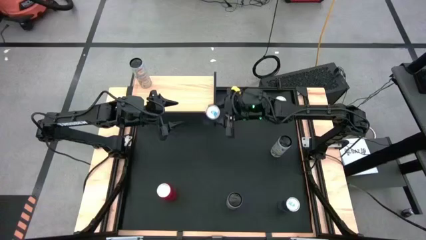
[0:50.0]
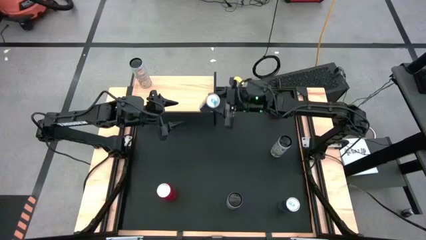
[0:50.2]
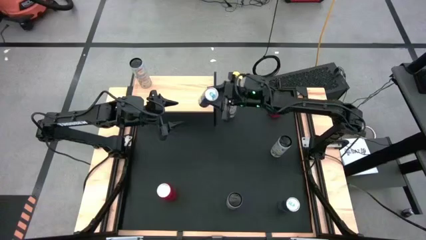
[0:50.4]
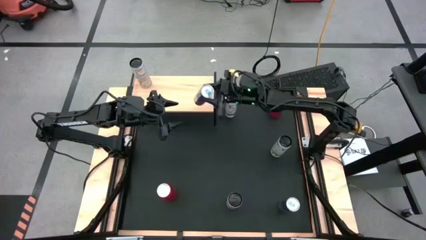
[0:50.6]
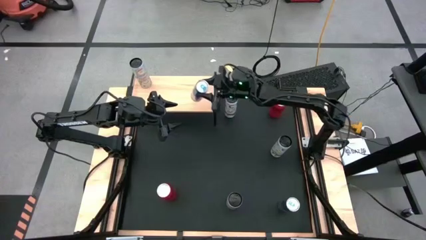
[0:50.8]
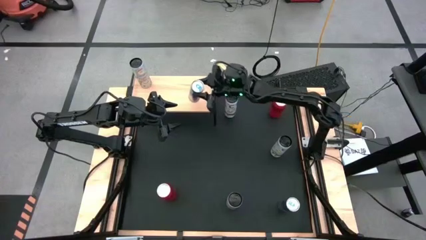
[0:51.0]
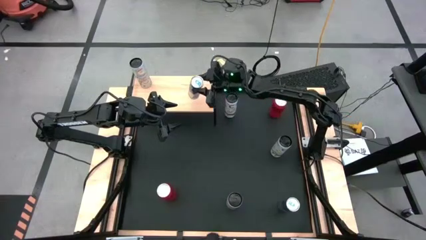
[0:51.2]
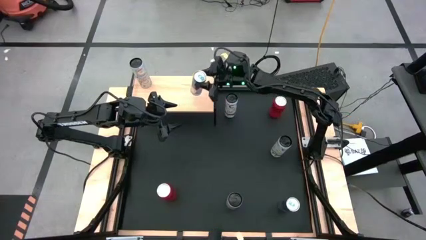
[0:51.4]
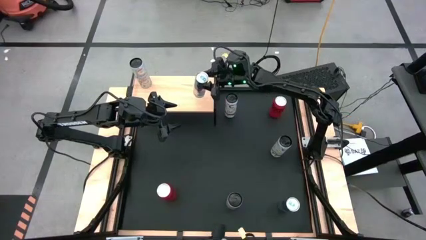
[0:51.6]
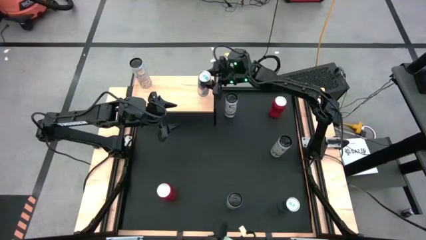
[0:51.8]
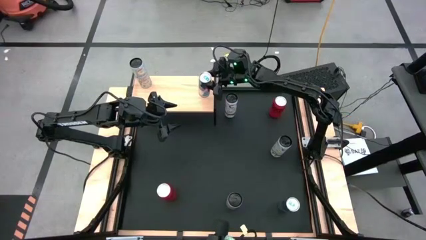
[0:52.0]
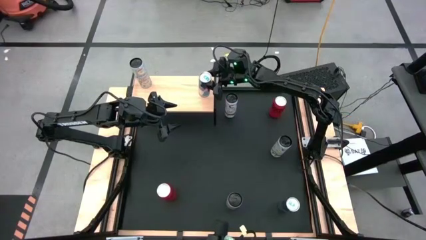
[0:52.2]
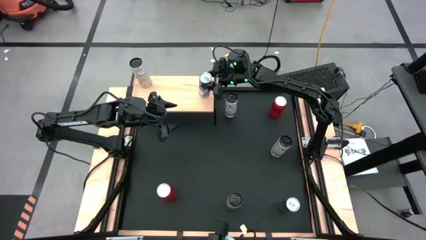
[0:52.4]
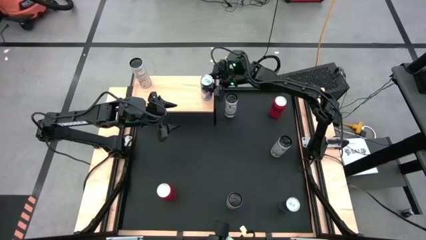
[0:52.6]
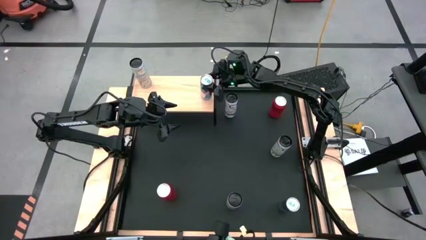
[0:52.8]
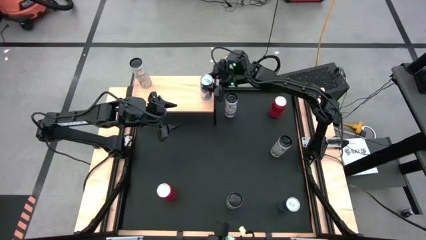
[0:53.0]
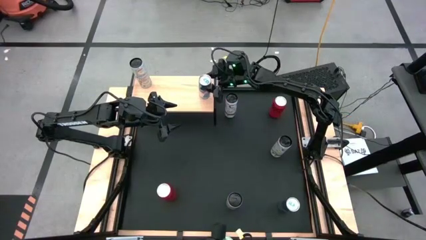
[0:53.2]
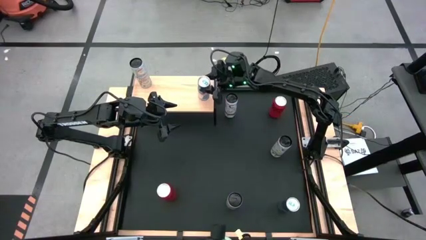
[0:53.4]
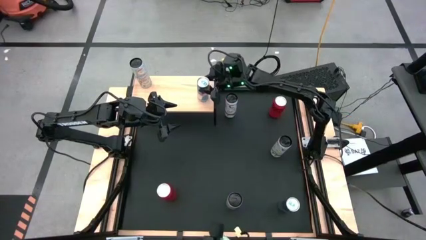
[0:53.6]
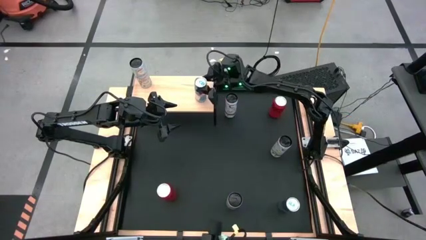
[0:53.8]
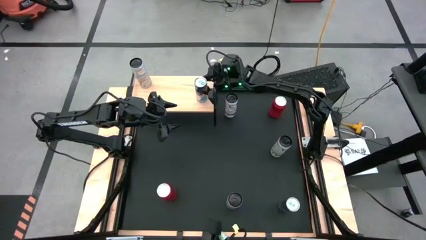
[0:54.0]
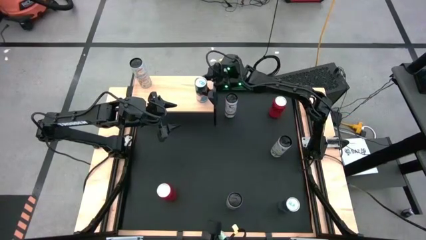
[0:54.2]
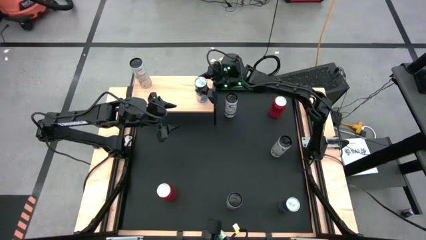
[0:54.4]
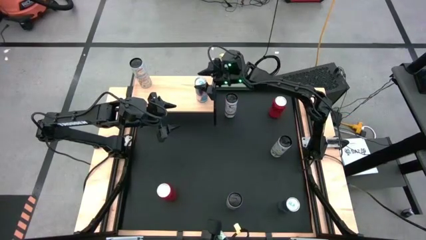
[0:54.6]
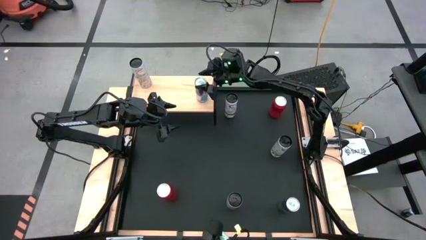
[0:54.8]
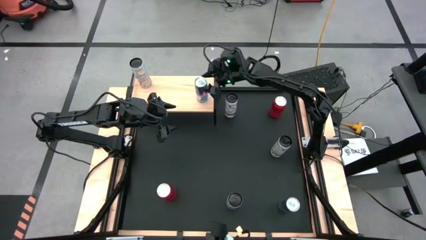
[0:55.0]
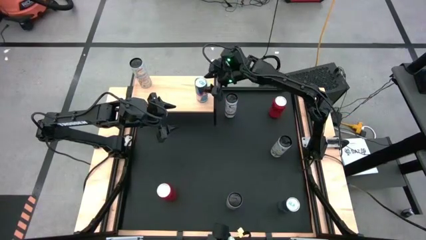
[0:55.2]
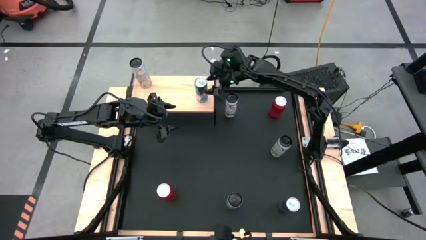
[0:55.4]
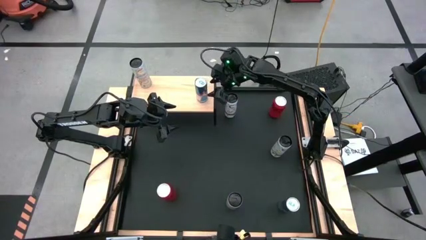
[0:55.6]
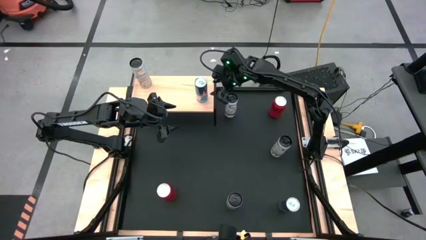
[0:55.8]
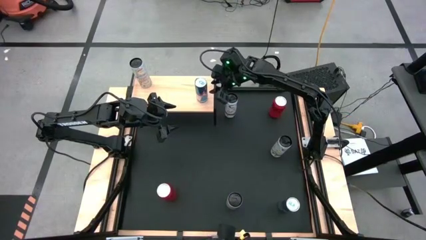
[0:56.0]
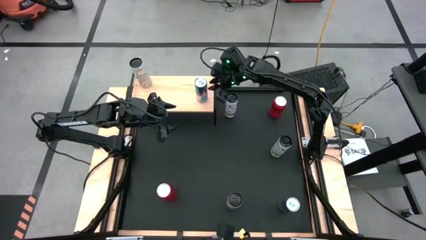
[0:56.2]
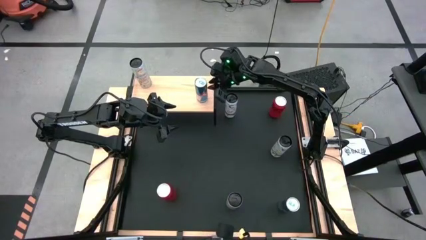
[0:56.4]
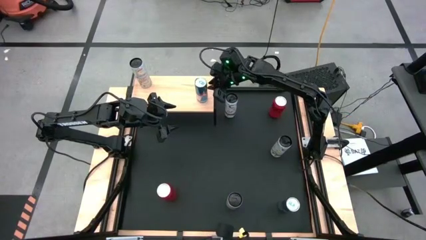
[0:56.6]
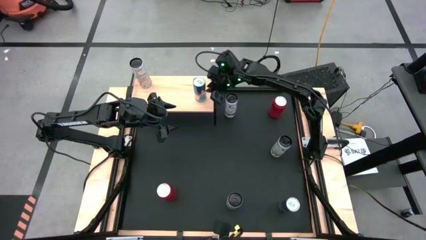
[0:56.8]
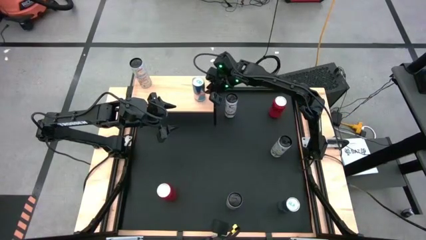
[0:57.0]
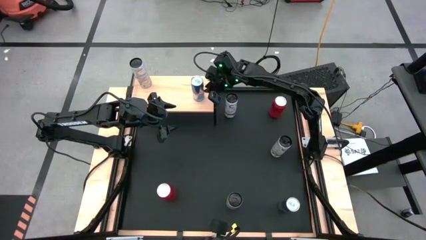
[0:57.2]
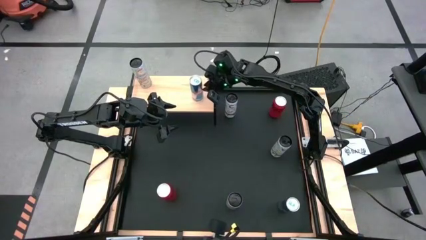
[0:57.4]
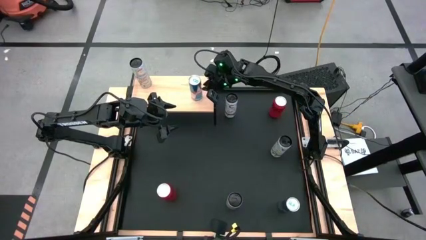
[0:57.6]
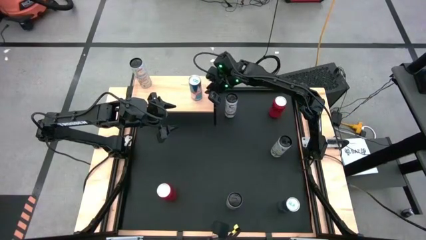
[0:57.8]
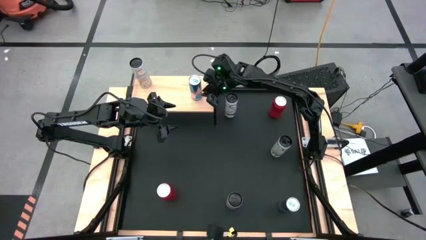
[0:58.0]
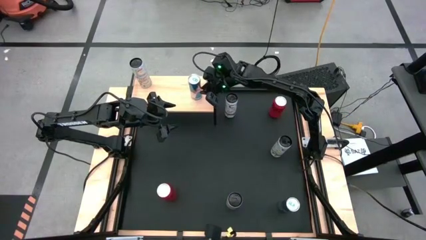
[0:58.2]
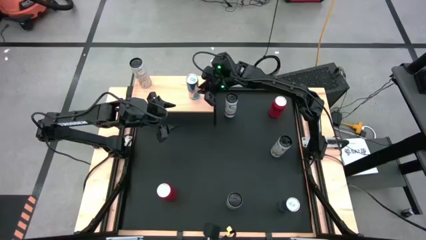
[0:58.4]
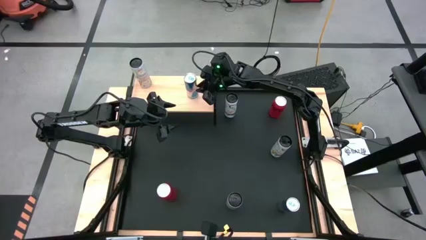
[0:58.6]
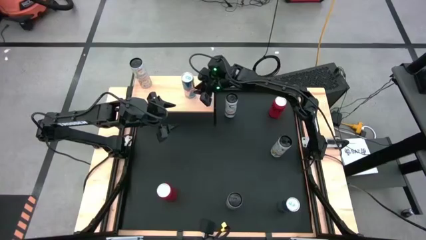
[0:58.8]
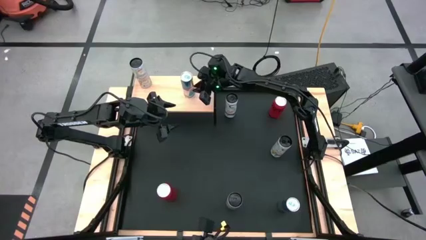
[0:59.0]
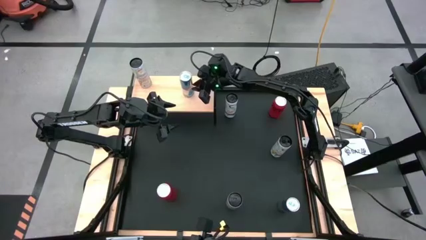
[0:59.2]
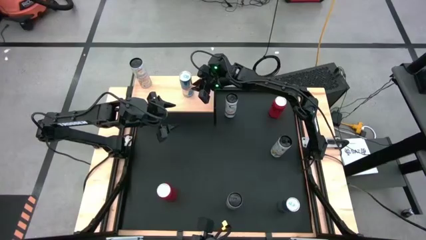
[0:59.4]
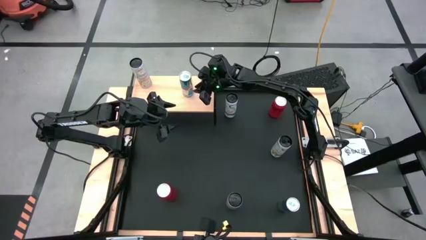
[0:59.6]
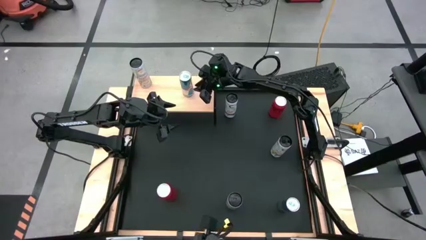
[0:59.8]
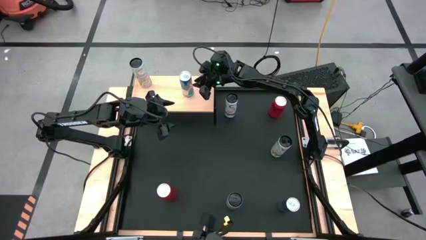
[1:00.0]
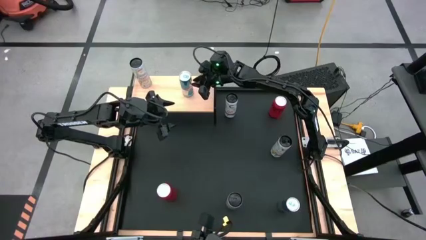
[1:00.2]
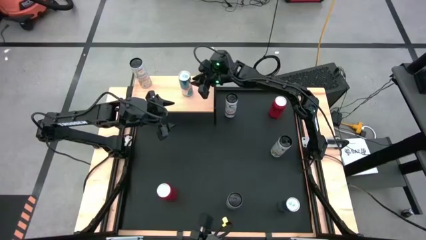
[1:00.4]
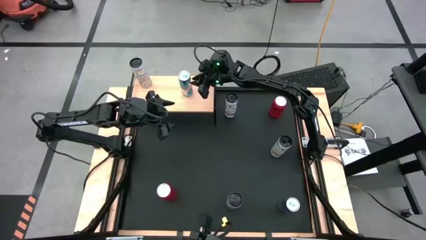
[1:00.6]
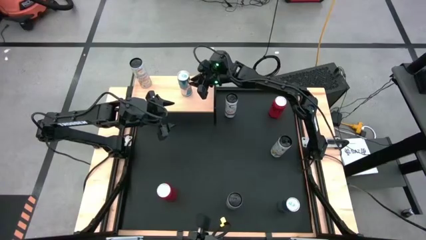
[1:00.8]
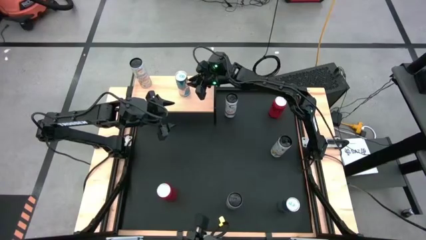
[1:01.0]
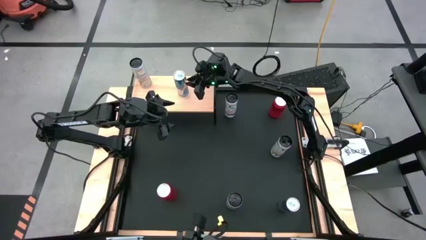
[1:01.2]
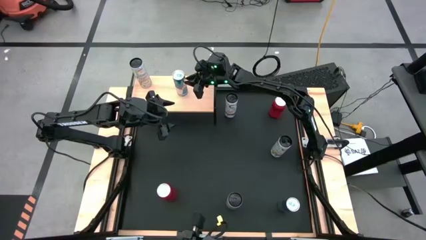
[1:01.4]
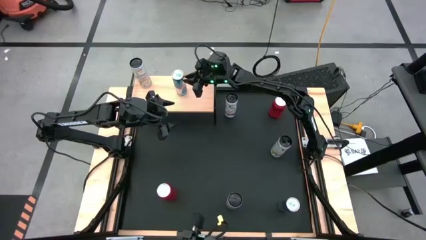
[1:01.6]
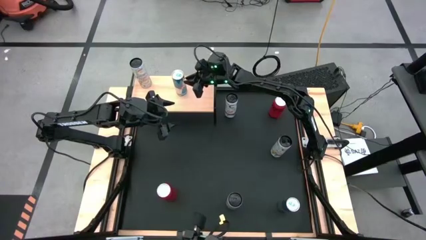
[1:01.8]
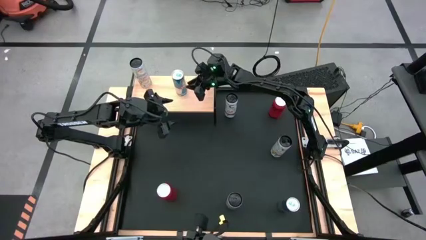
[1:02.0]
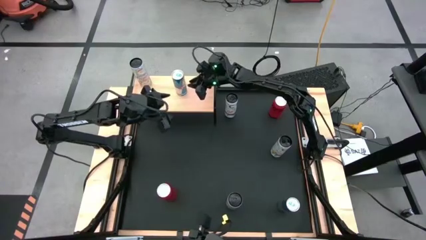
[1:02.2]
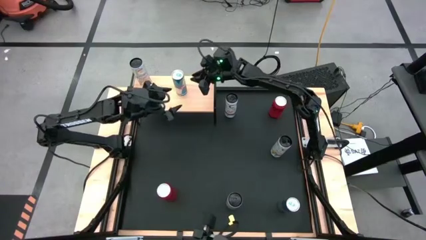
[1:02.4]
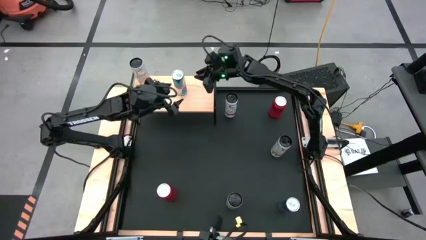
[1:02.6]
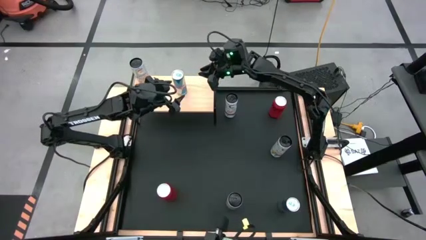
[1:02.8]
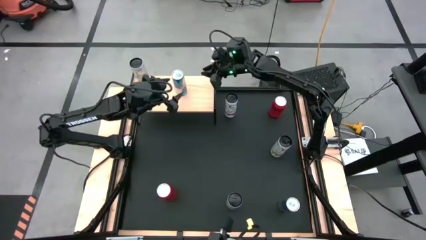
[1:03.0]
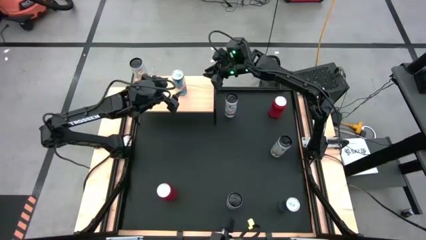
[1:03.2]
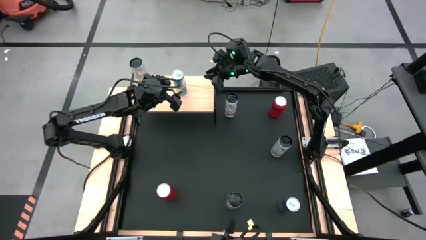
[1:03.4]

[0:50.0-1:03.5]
Task: Place canned beverage on shelf
Put the top blue soda can on the shelf
